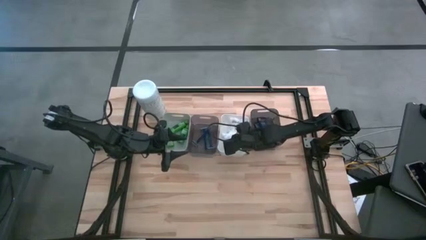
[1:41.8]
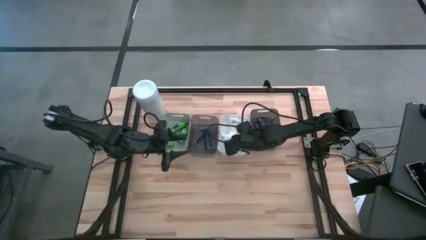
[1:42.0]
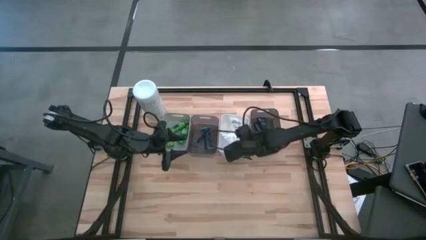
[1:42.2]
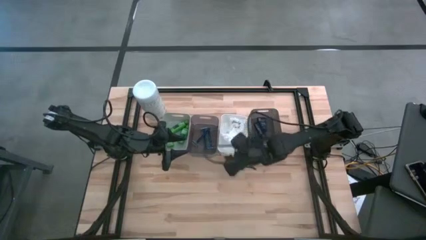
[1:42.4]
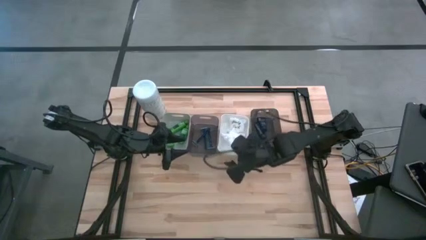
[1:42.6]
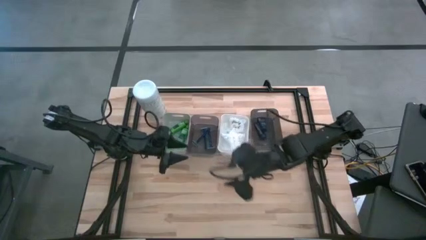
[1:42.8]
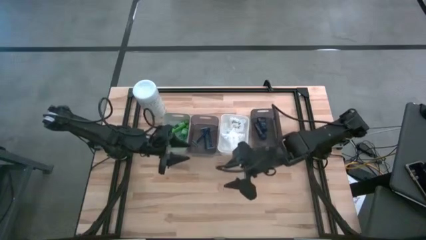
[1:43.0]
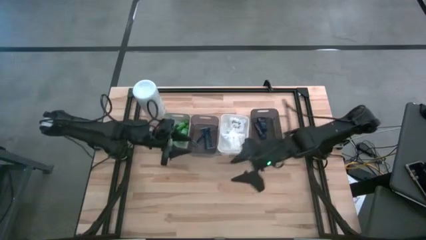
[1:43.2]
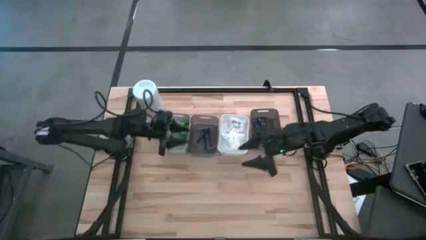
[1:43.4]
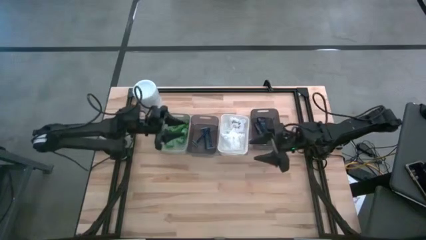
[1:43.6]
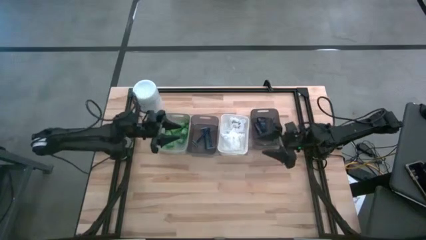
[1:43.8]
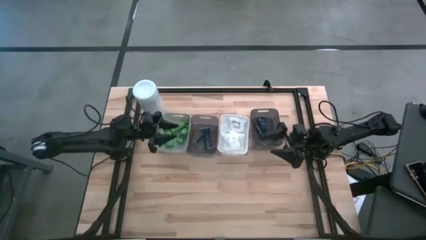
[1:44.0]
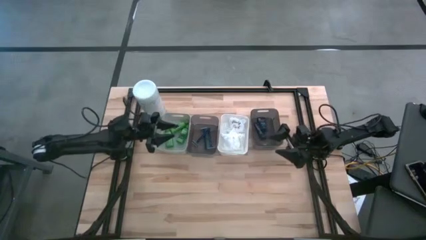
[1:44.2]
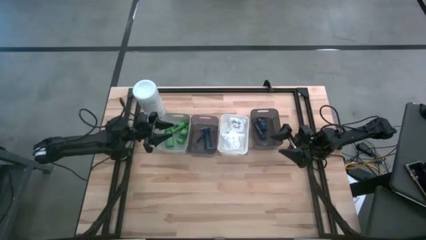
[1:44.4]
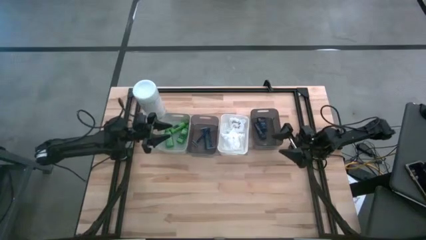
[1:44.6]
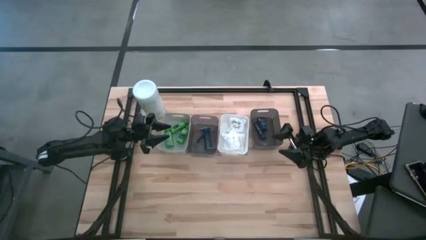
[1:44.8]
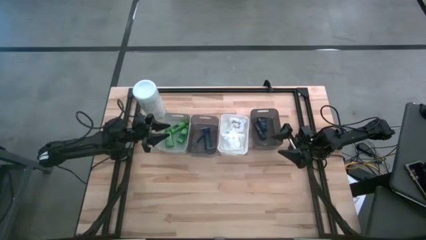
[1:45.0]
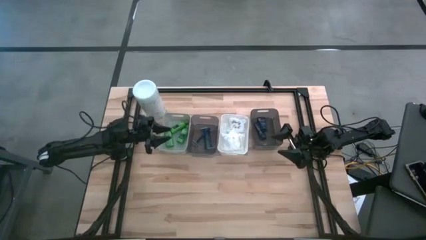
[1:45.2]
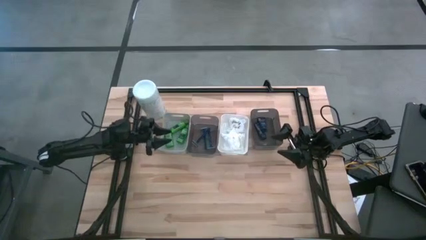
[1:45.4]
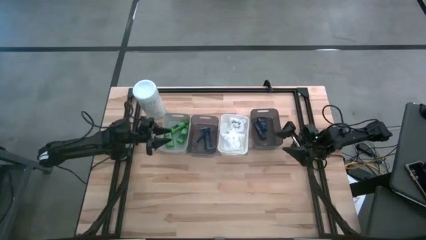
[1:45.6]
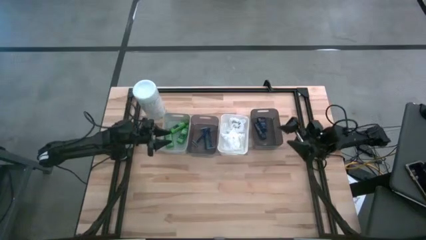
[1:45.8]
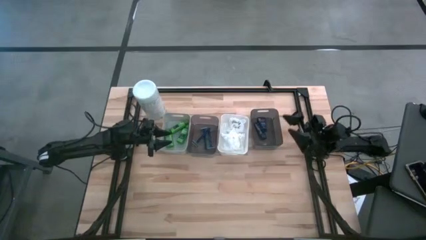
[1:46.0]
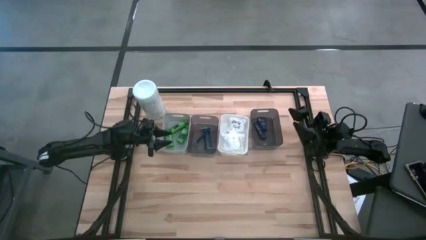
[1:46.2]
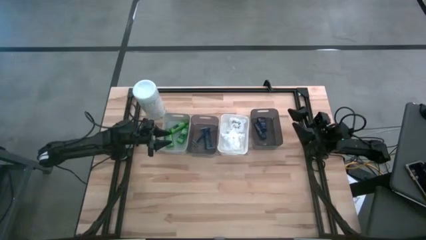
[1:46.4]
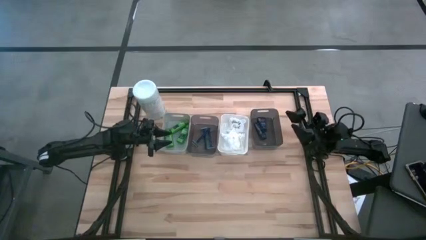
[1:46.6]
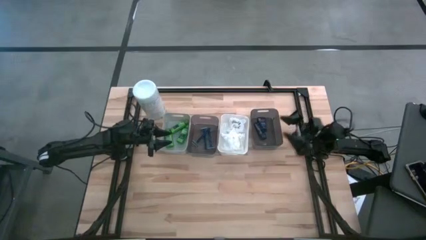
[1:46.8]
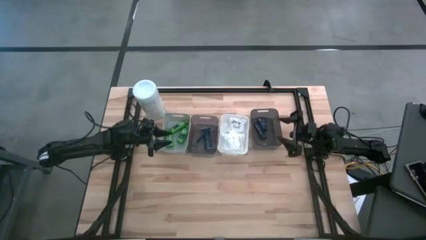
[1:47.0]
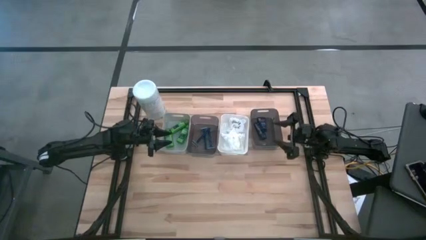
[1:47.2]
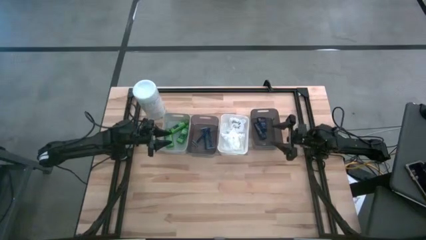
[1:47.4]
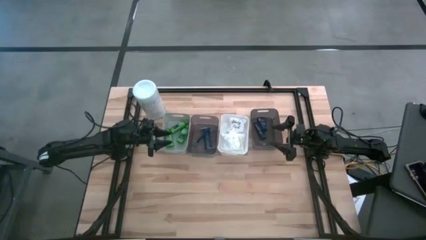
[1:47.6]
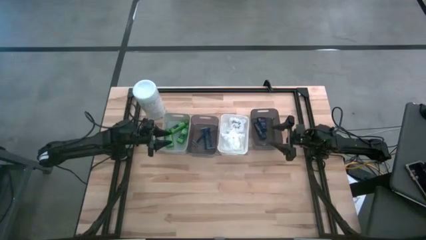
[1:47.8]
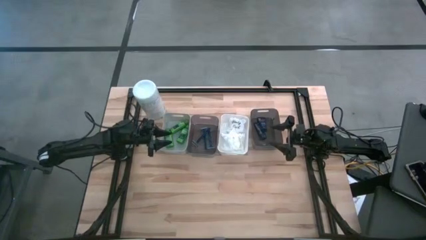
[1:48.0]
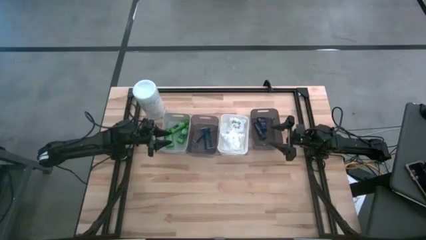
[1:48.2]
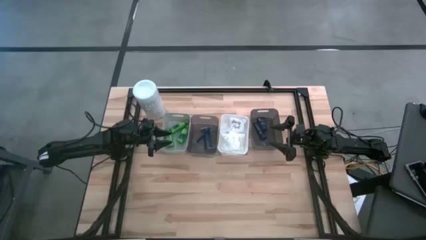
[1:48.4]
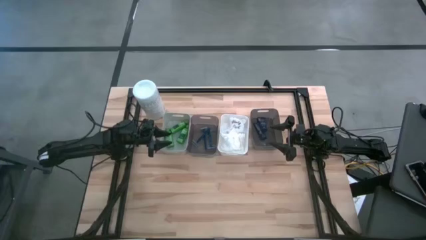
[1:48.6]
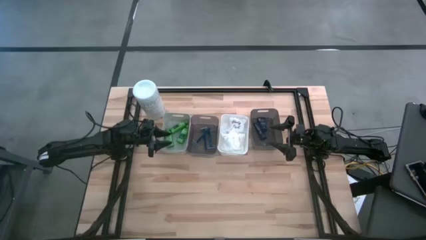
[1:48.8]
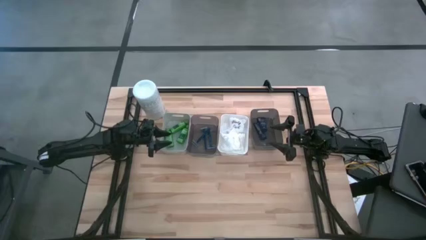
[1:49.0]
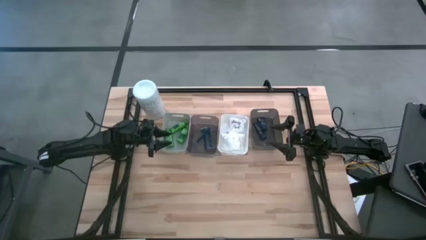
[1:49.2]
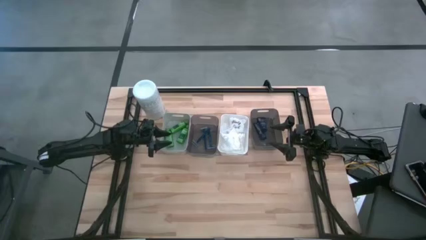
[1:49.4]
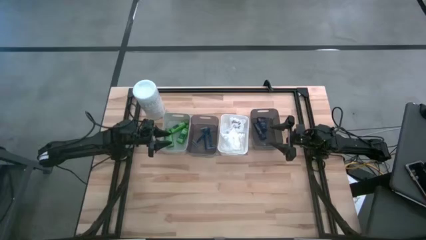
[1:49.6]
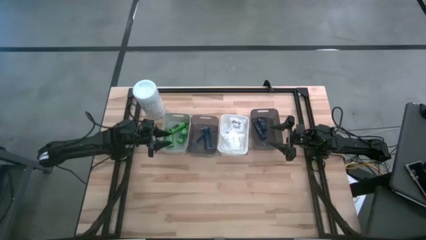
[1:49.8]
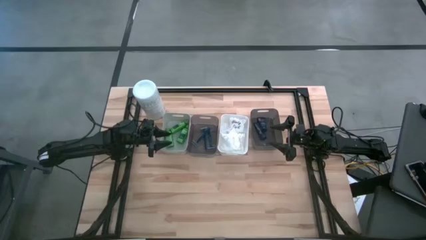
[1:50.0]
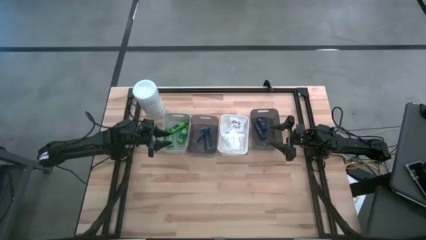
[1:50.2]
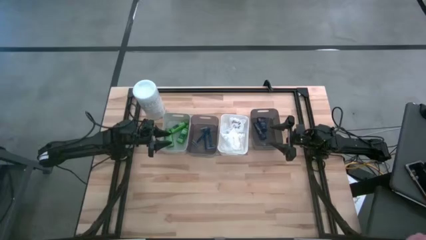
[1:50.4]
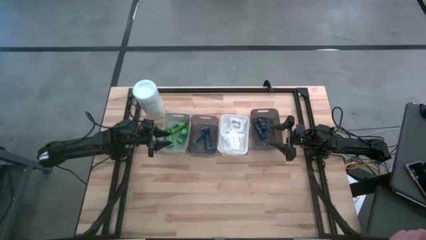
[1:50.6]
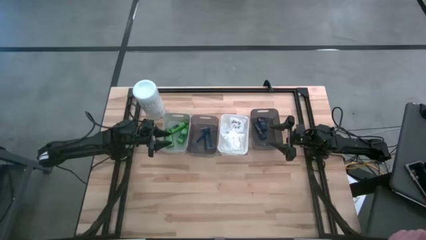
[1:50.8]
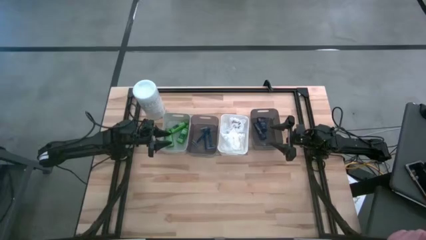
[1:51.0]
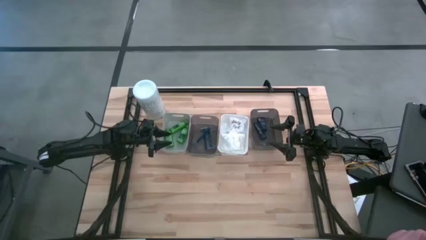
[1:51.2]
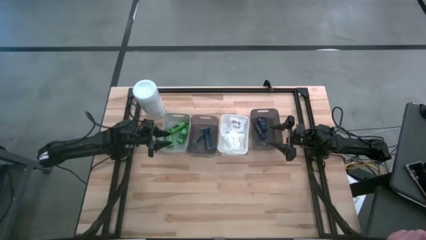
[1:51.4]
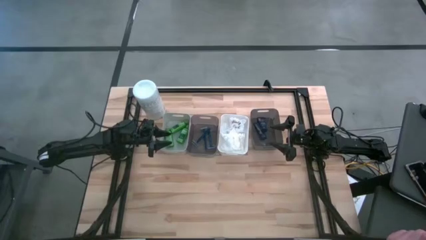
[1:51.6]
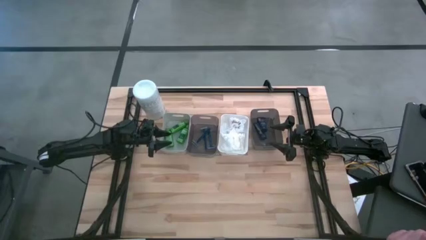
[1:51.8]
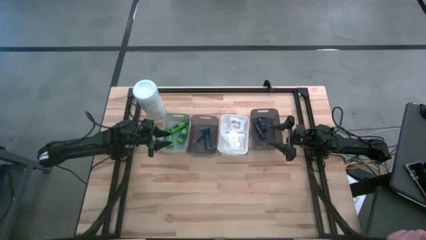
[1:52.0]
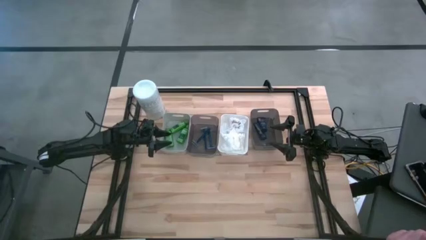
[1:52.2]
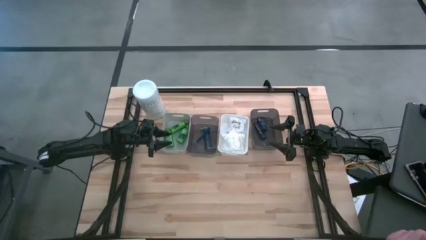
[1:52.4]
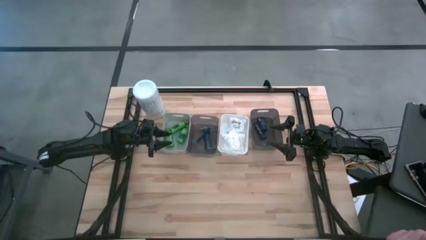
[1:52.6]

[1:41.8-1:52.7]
Task: Pick & Place Travel size toiletries
Return to Home Position

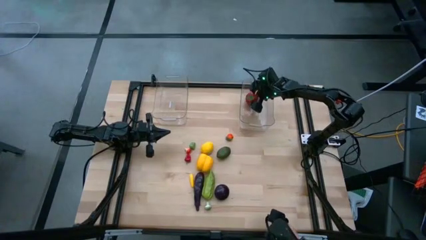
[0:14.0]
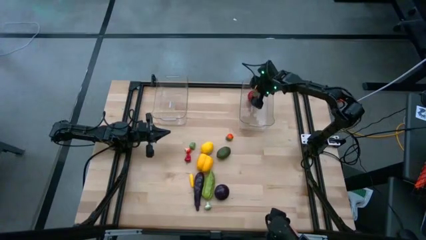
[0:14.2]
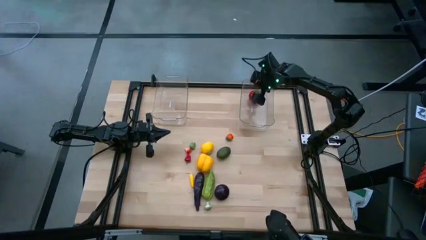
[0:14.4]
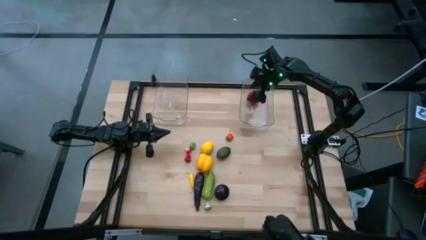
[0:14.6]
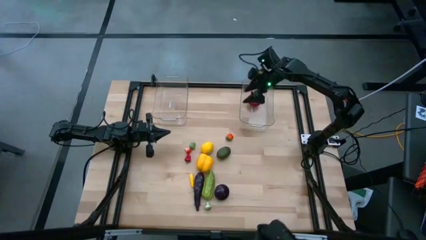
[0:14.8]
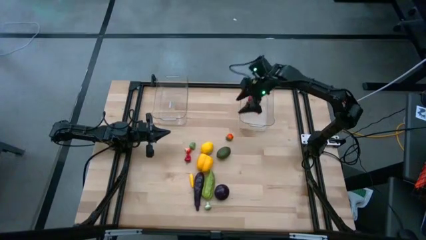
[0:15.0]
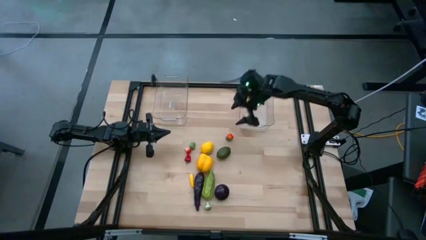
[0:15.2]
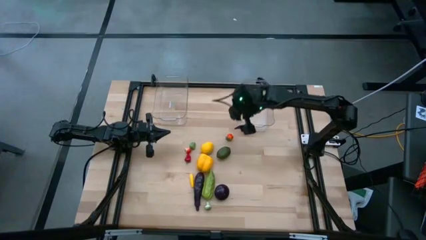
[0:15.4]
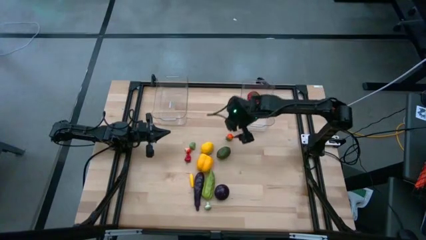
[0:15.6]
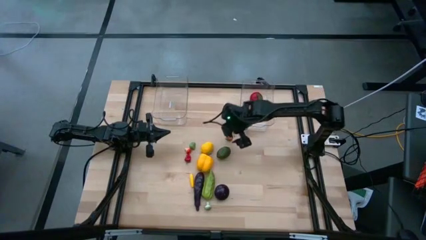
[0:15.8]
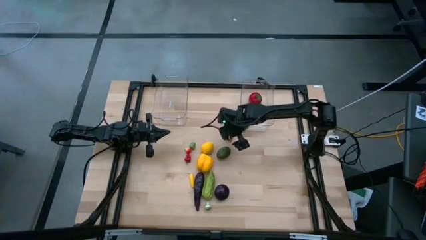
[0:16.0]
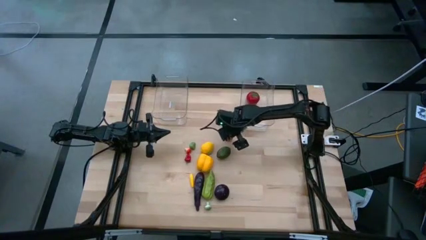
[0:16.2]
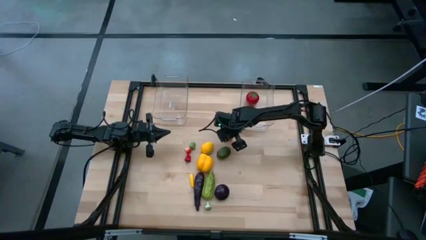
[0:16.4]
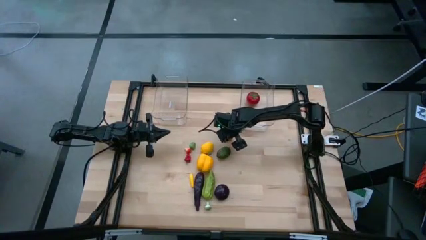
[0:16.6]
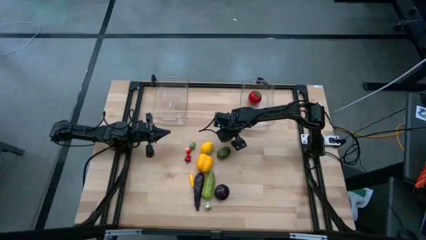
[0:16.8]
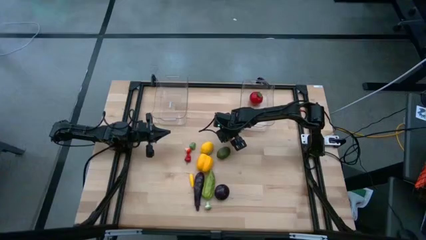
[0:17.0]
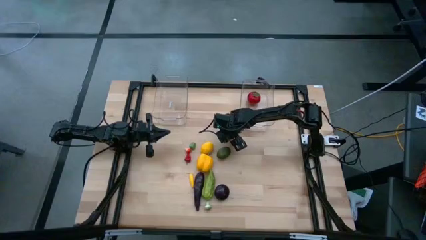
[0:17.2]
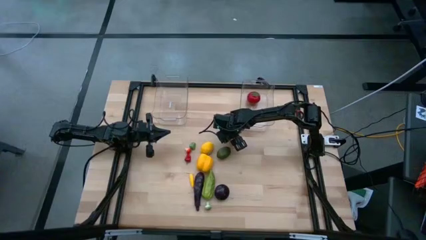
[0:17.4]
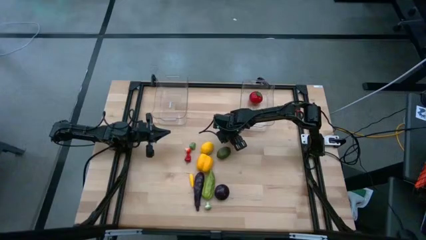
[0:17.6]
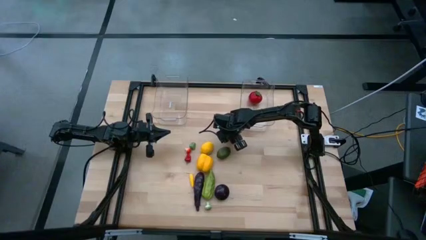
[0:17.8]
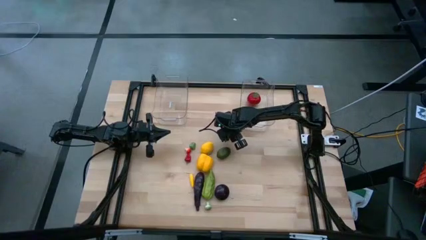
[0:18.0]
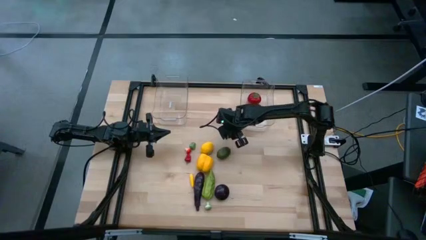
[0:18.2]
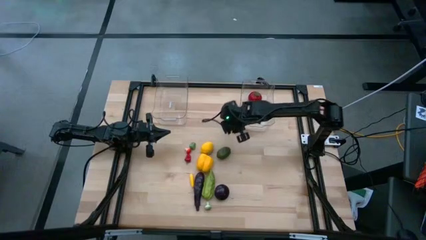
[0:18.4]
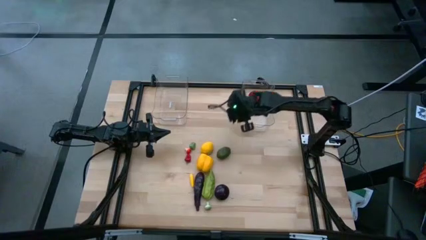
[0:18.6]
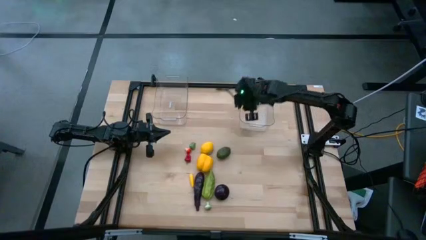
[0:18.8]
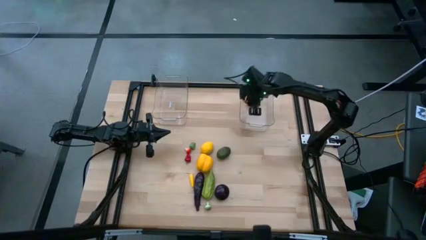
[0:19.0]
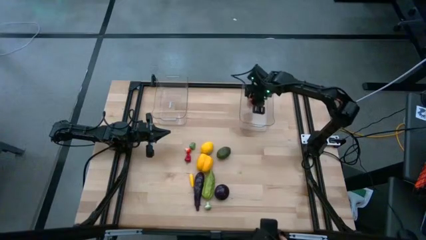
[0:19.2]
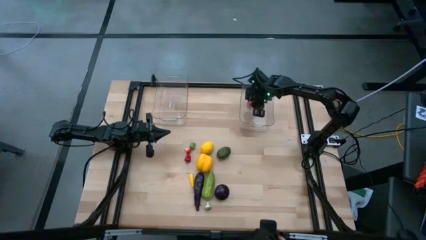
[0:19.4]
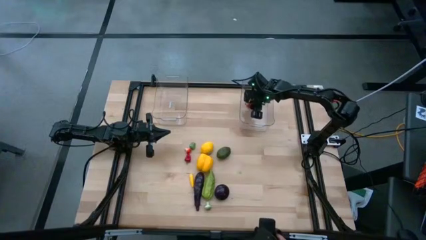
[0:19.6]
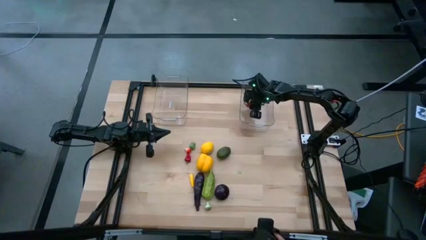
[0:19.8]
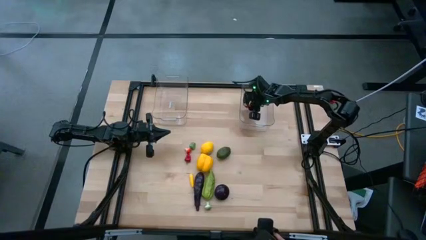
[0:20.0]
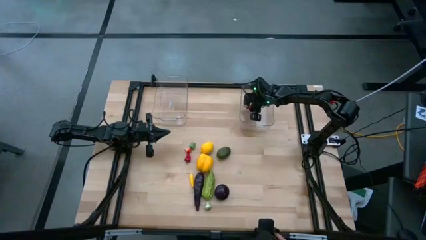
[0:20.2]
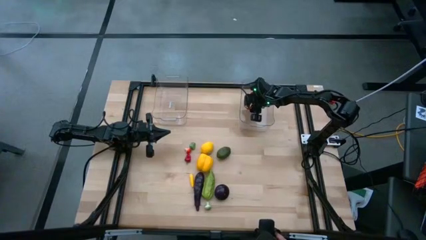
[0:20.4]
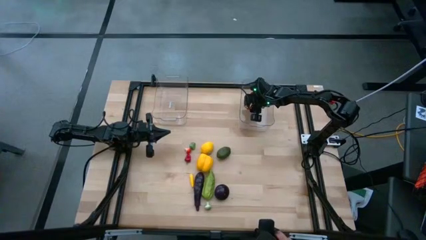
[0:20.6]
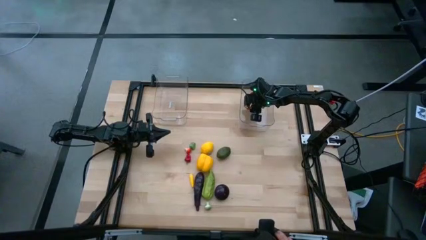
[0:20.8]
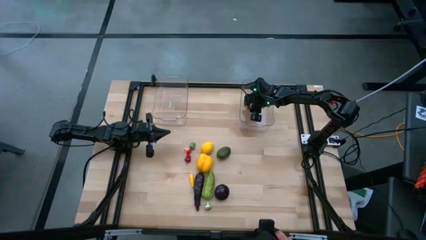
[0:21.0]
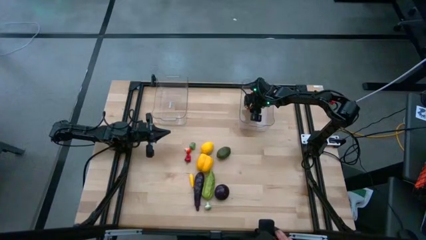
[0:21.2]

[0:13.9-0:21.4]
Task: Sort produce into baskets
Put the orange peach into the right transparent bin
